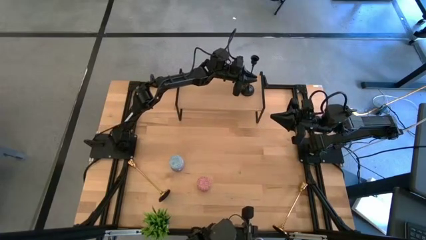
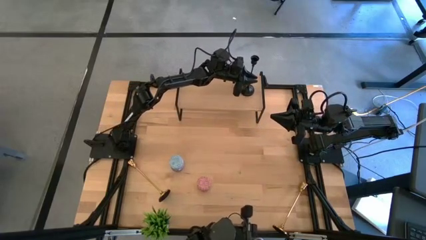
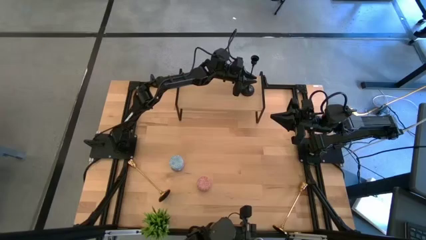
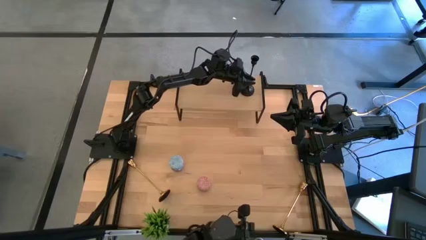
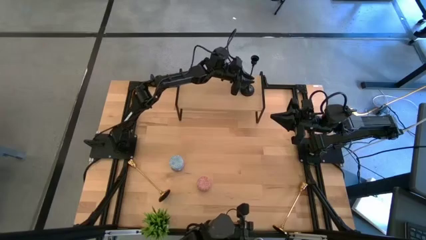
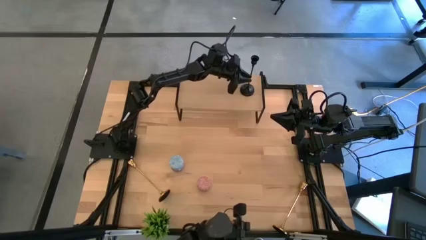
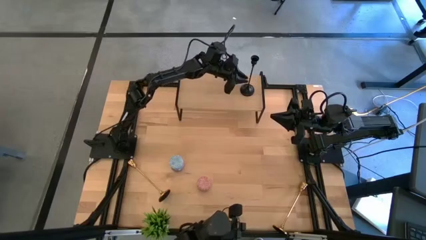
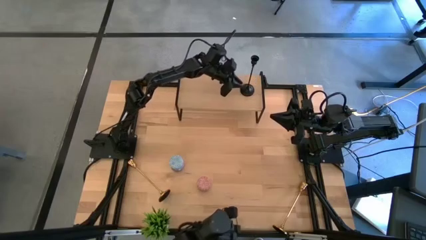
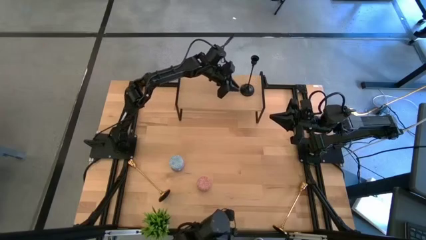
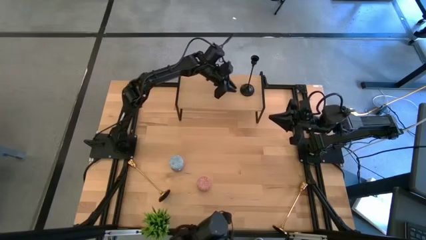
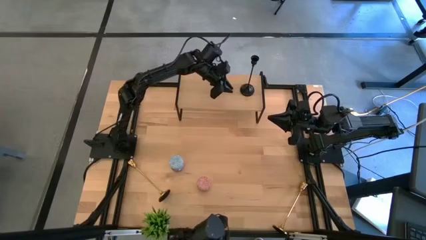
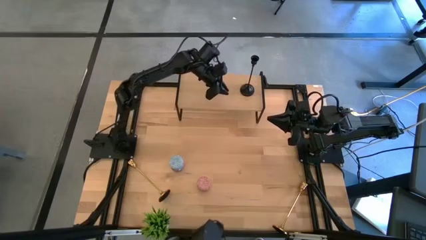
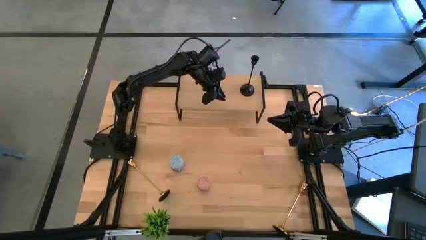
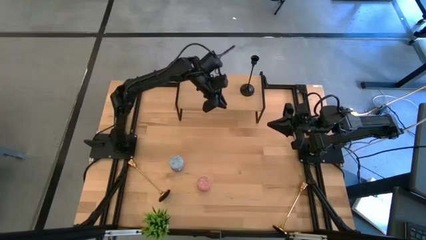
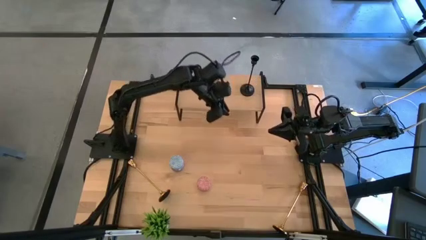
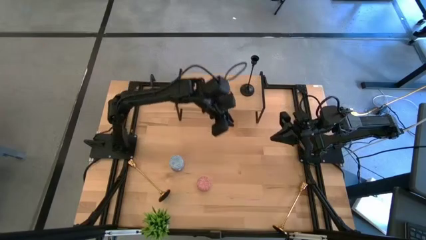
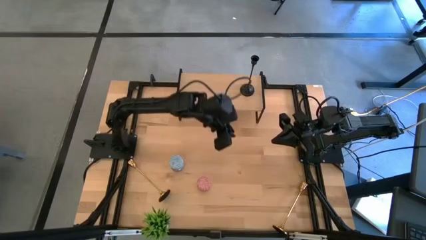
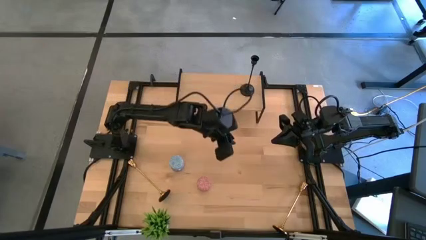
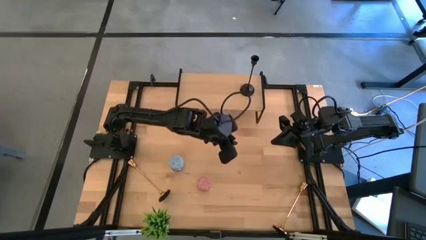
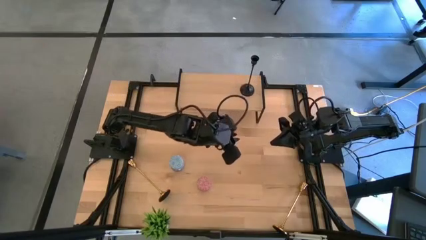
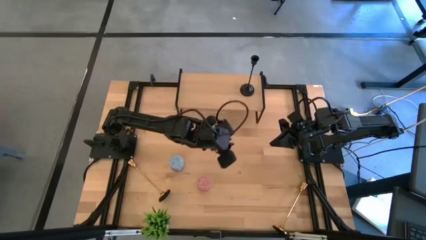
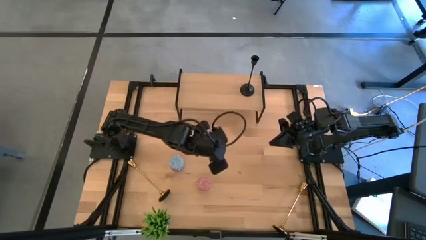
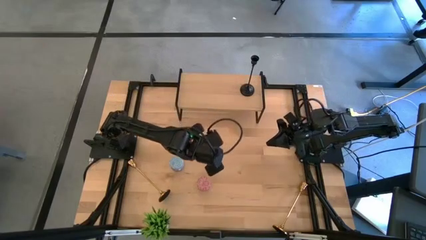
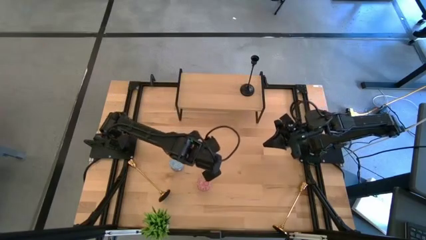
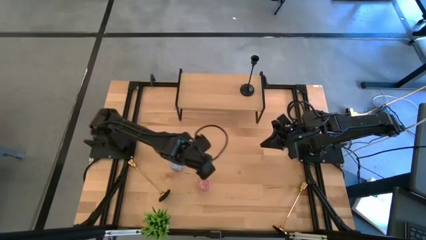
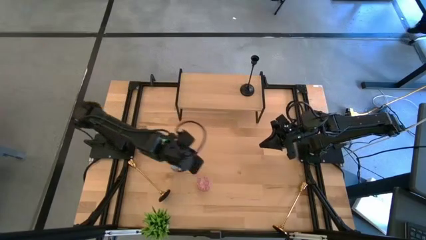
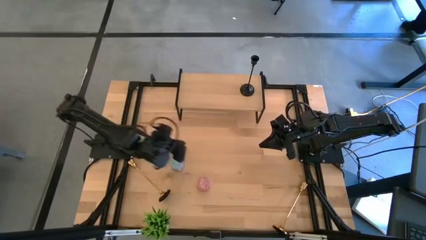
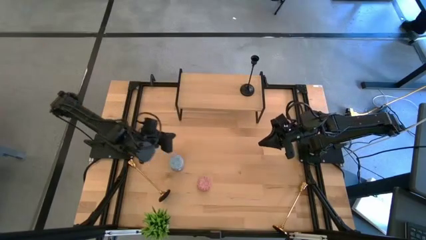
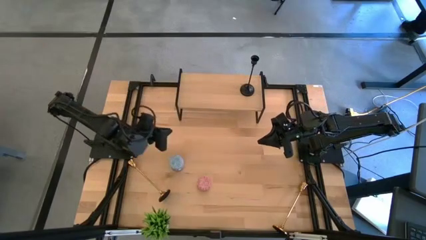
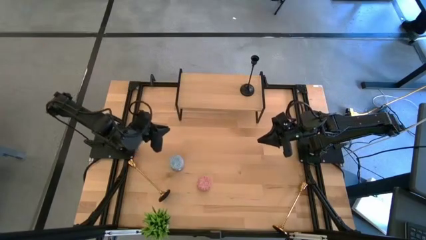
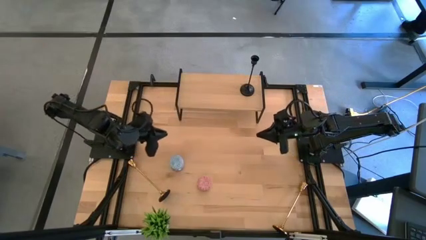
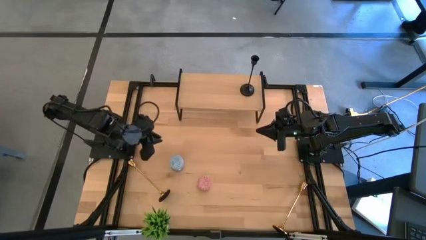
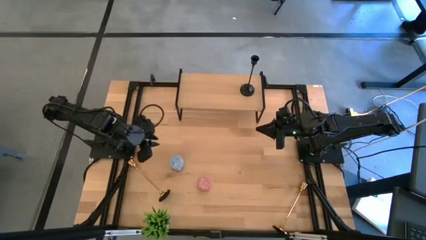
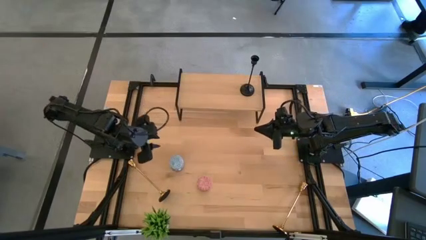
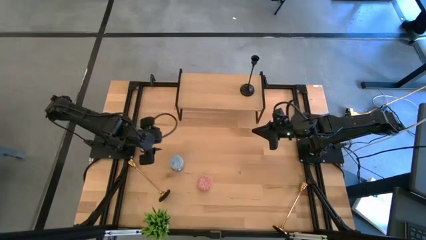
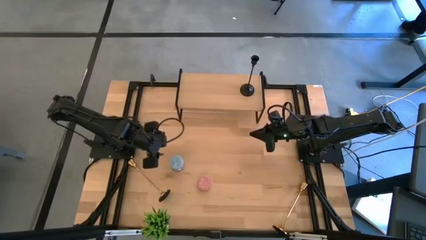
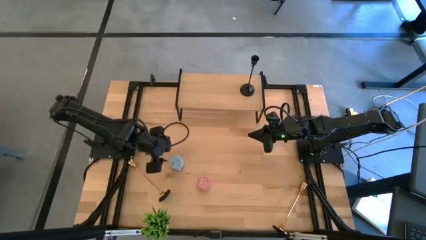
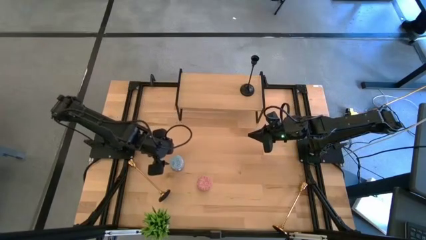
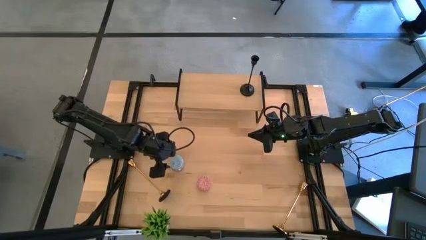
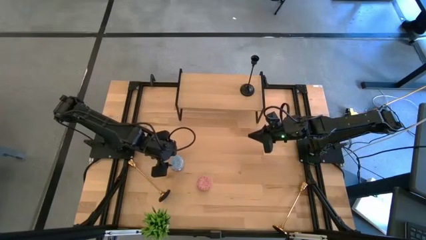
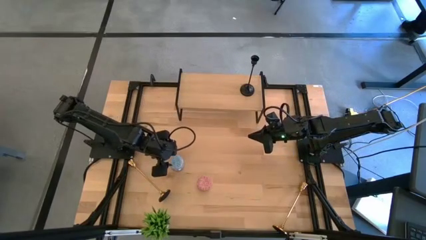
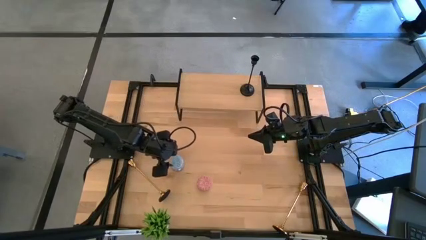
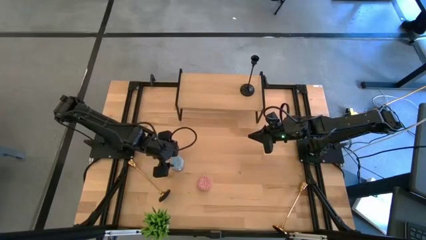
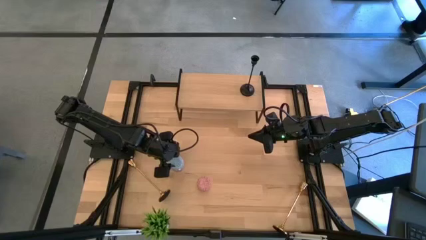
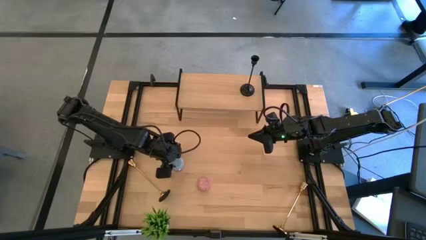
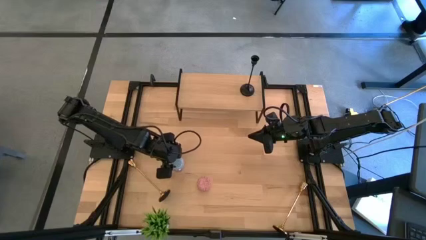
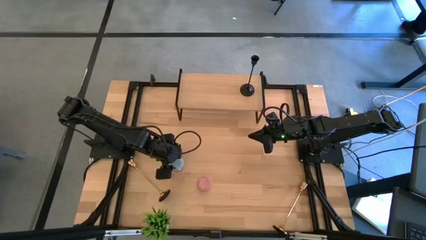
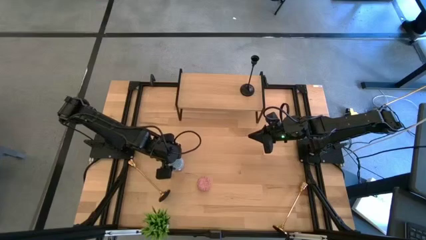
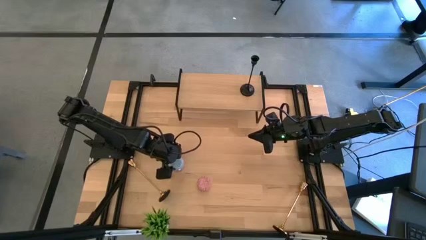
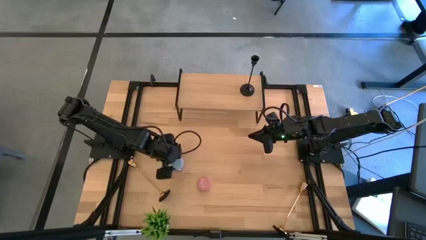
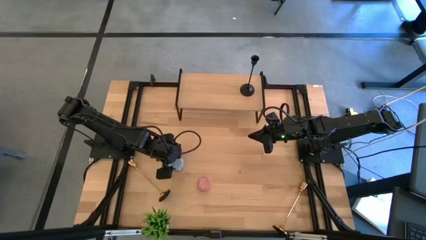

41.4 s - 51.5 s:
Task: Pick & Place candle stick holders
Put the blue scented candle on the shelf

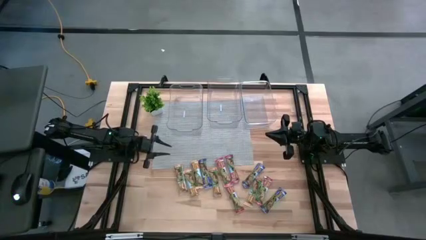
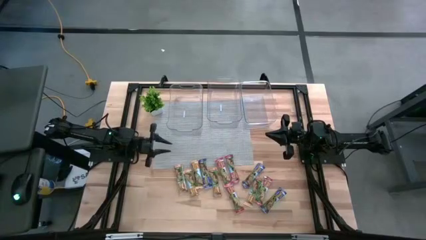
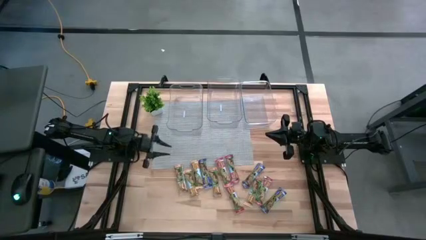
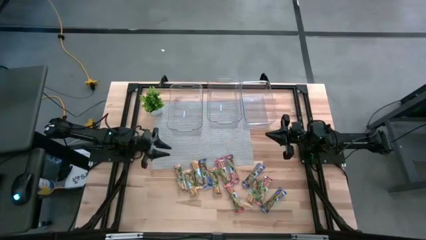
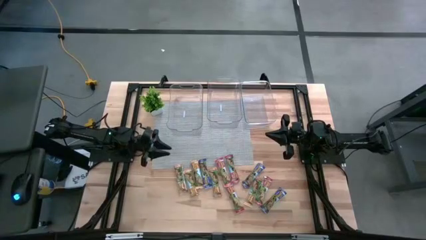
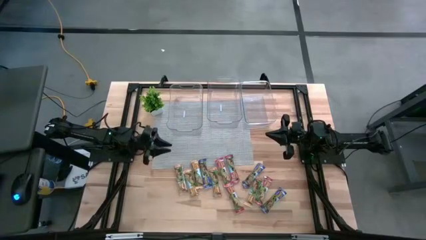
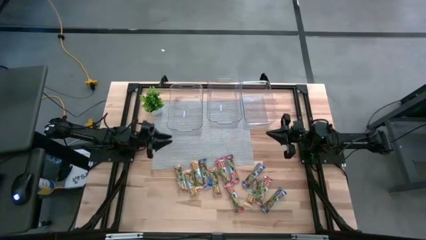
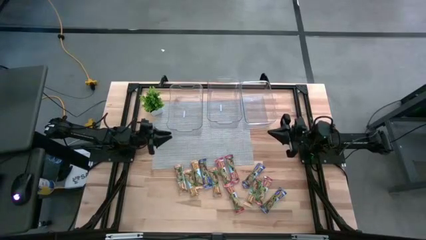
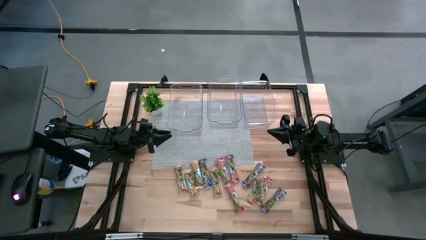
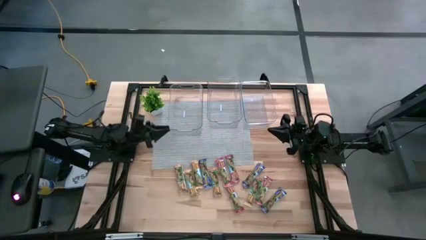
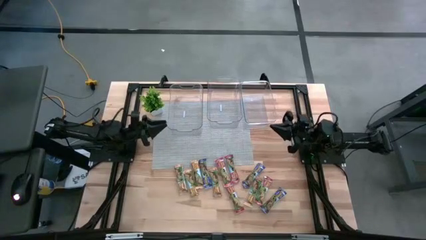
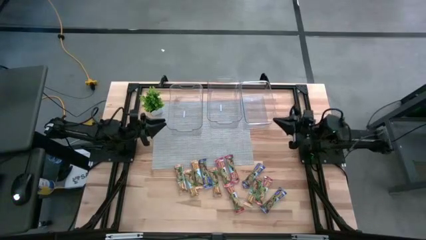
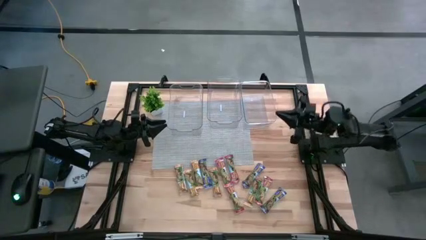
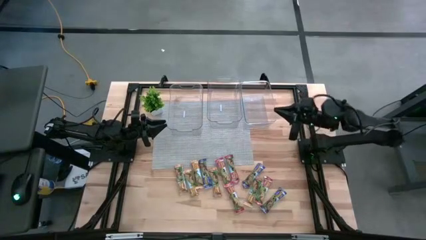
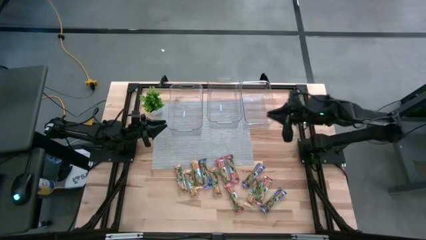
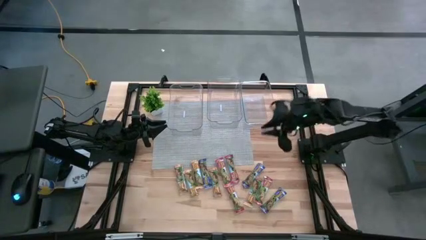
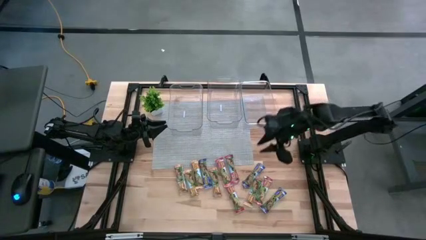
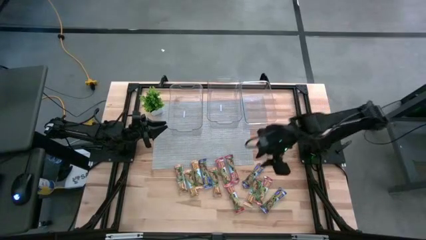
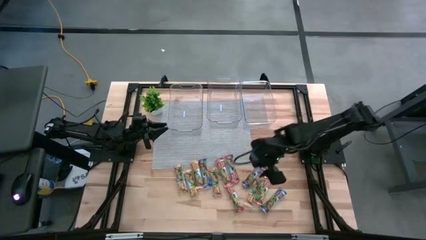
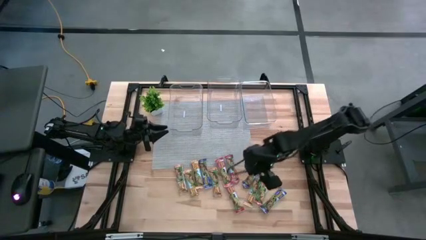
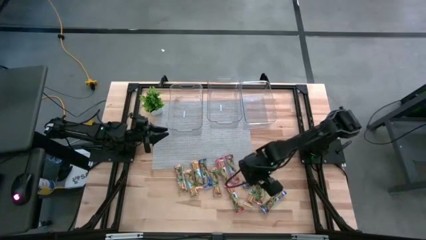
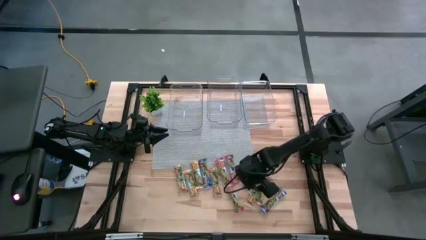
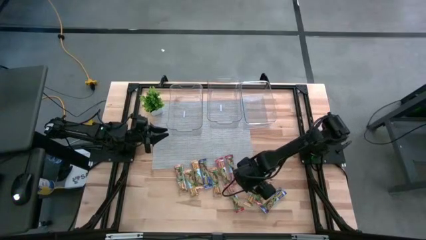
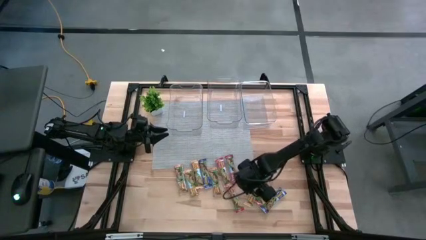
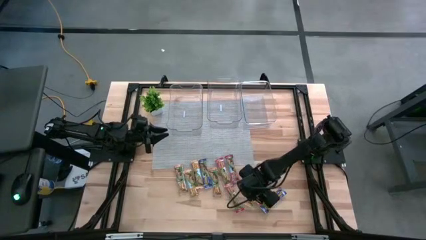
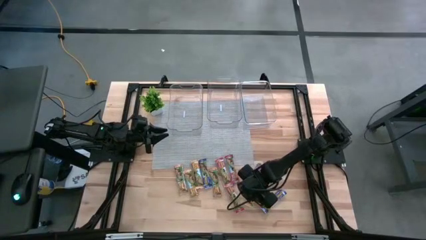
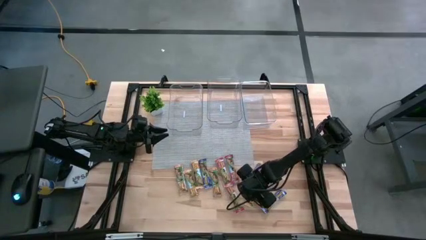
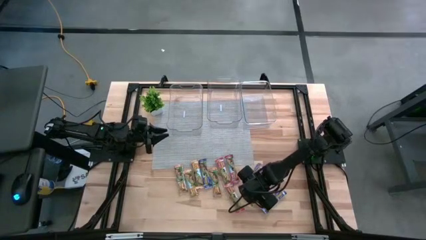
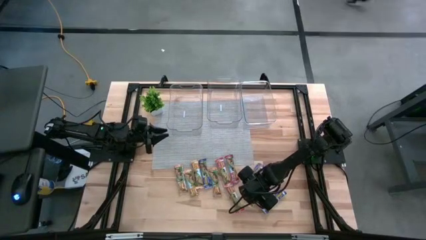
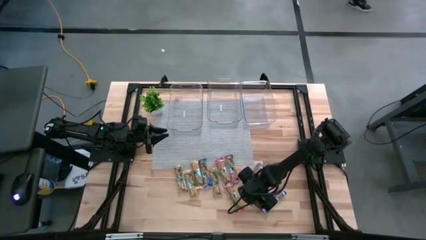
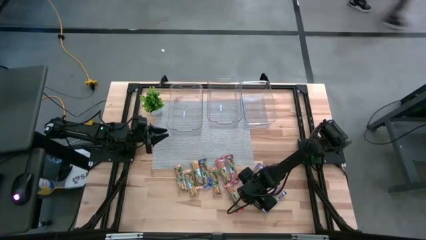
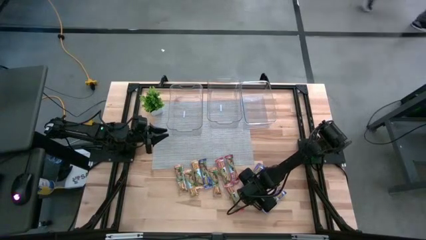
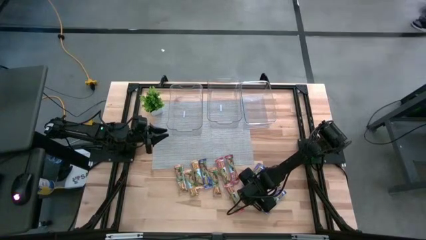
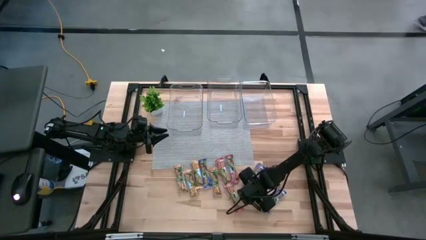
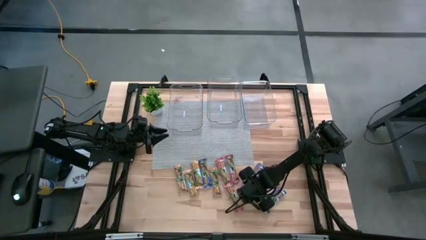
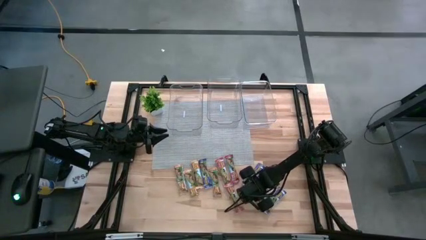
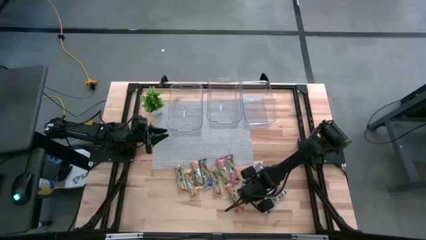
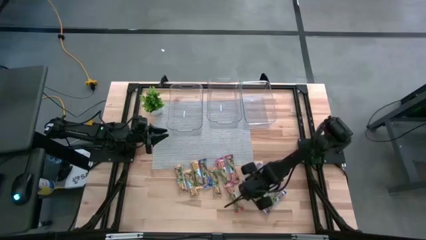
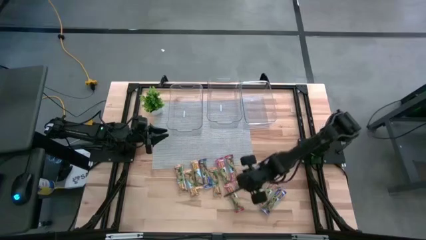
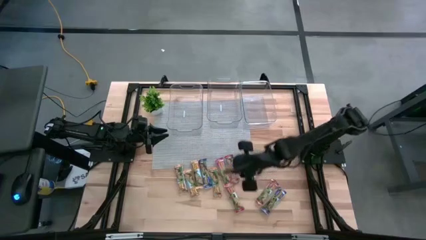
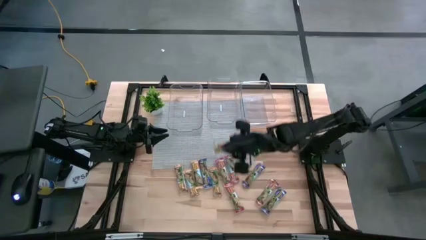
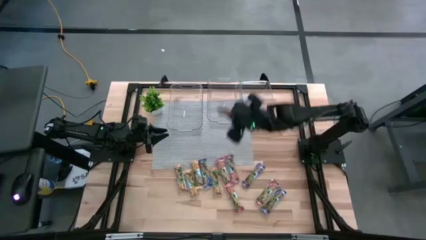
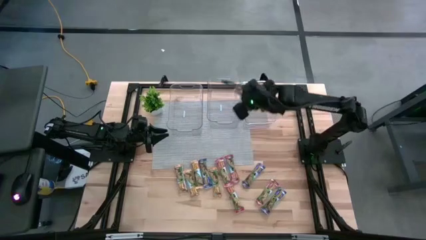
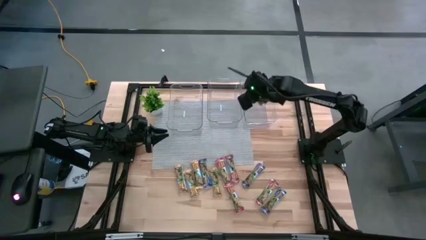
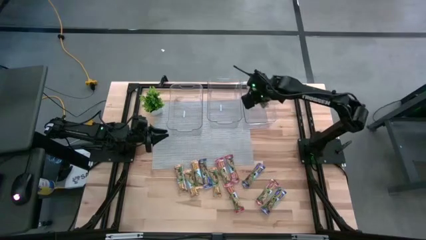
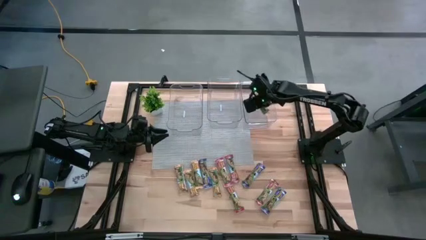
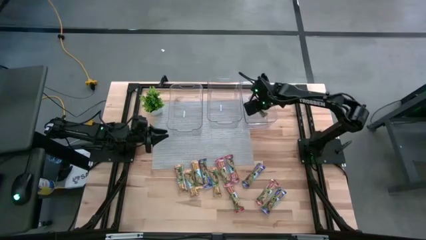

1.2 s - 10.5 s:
Task: Pick and place Granola Bars by type
Put the yellow granola bar into the right transparent bin
